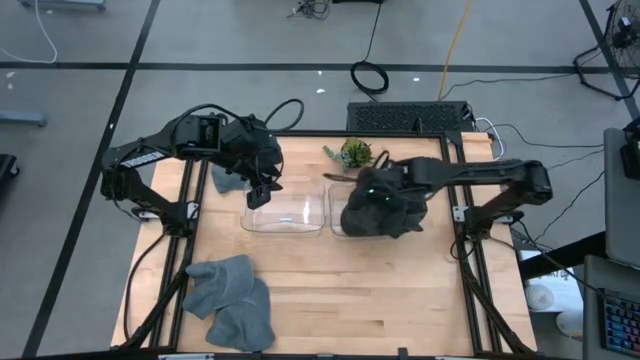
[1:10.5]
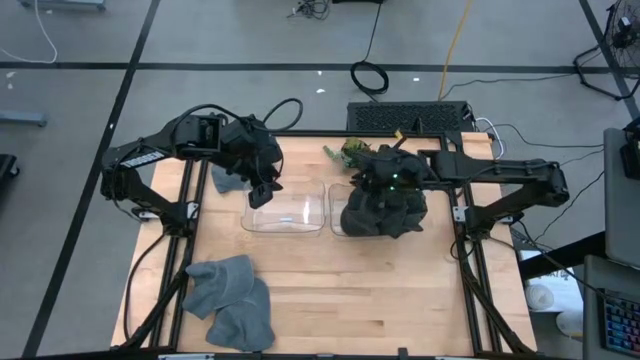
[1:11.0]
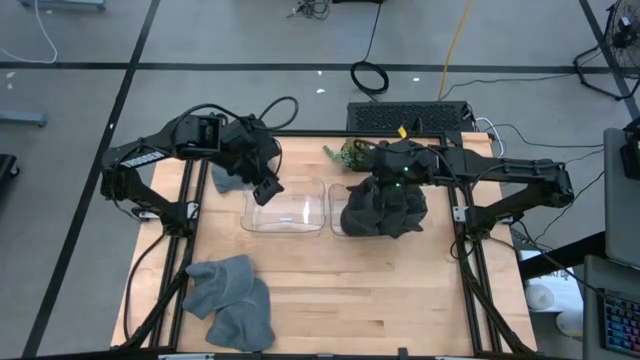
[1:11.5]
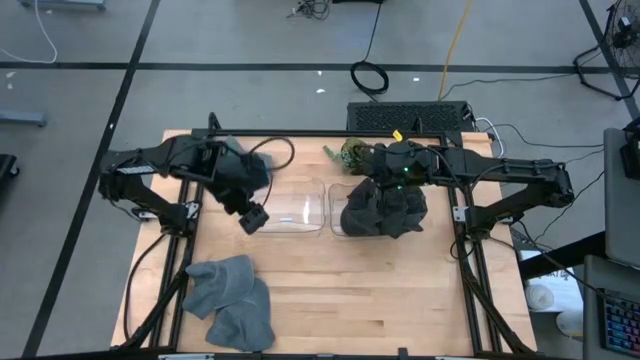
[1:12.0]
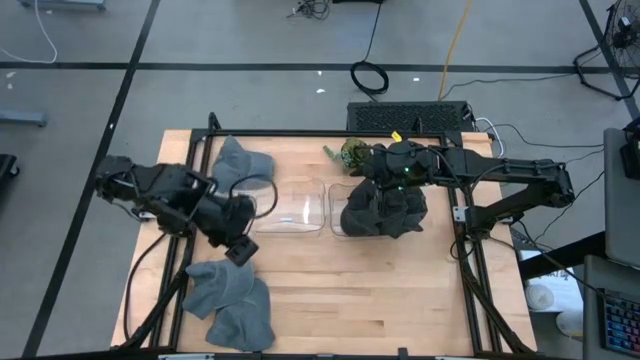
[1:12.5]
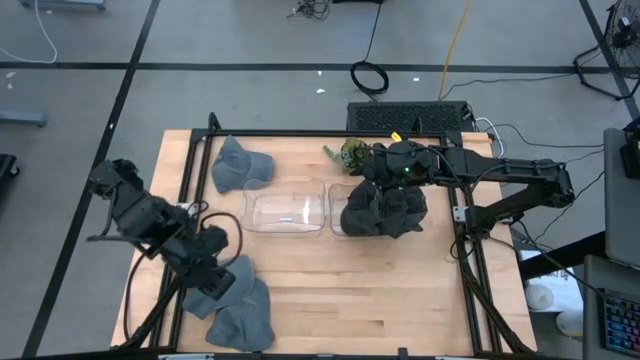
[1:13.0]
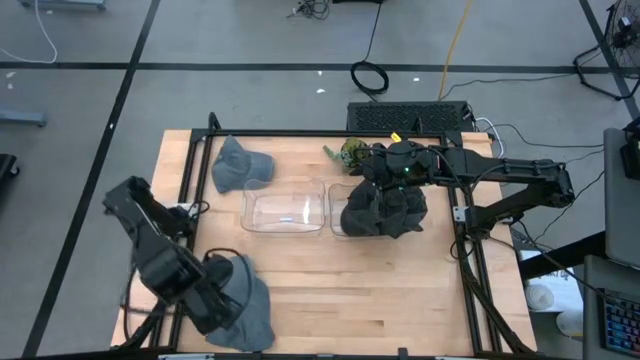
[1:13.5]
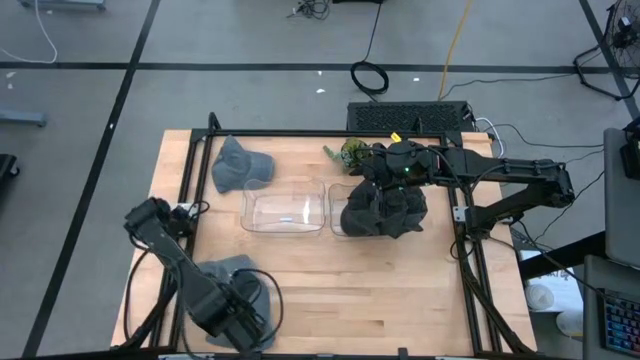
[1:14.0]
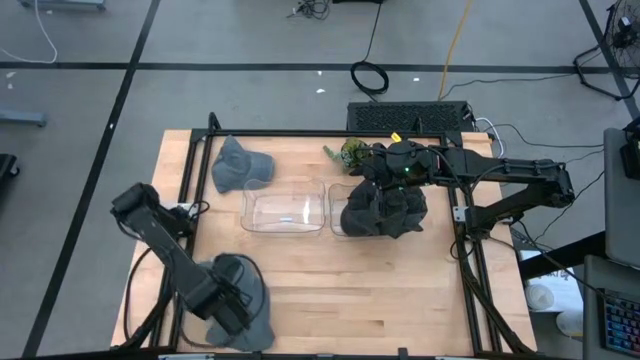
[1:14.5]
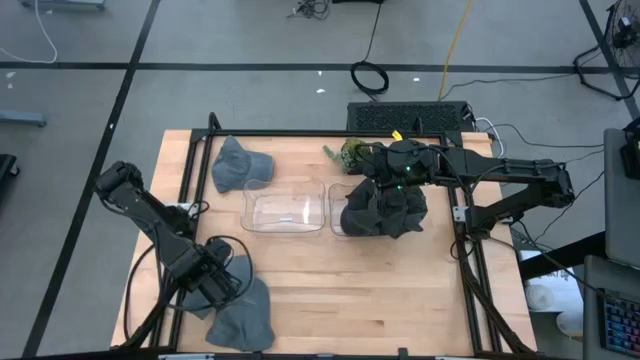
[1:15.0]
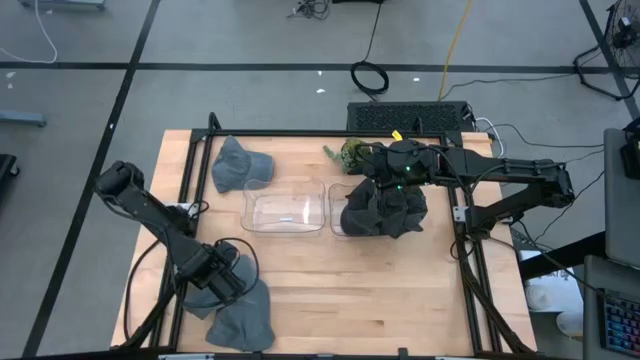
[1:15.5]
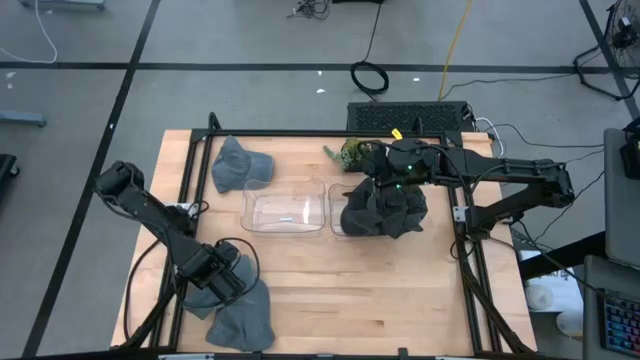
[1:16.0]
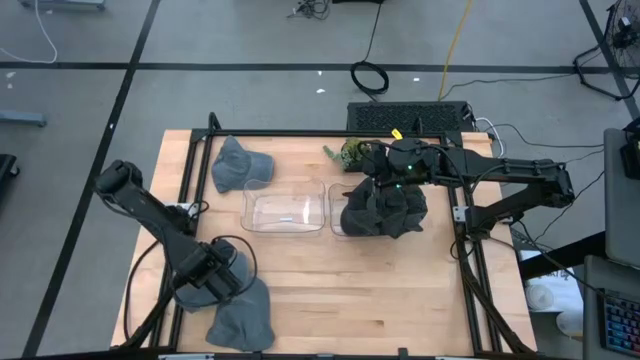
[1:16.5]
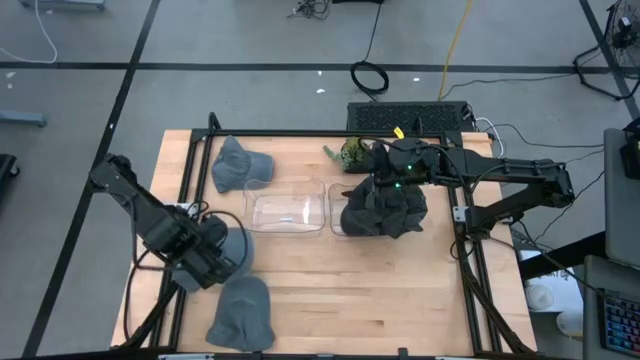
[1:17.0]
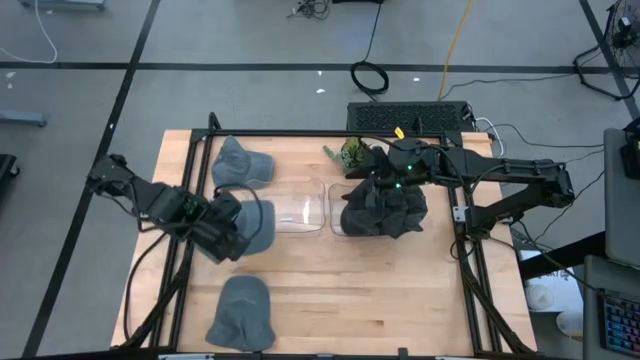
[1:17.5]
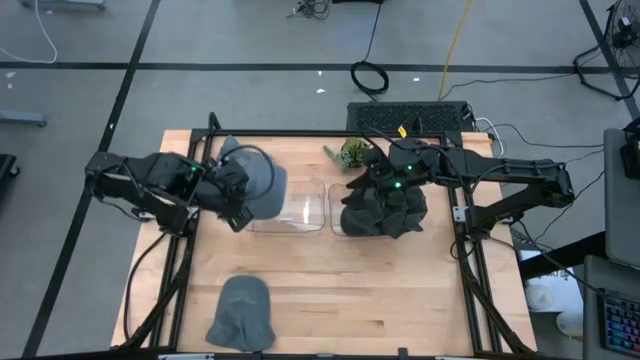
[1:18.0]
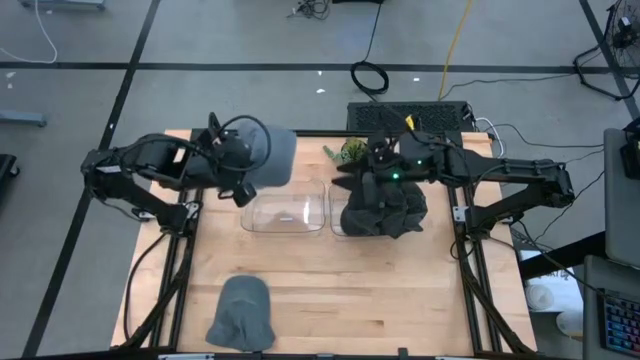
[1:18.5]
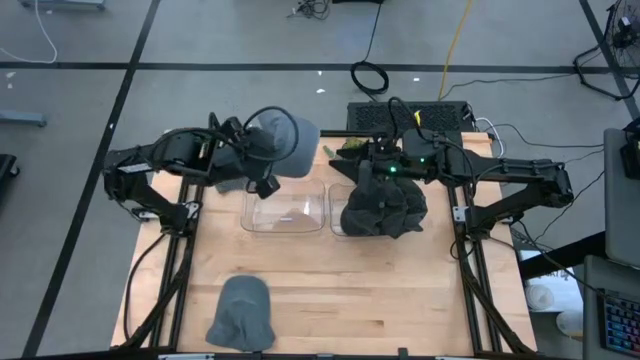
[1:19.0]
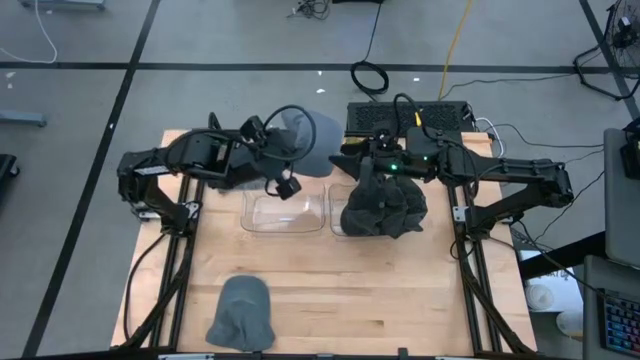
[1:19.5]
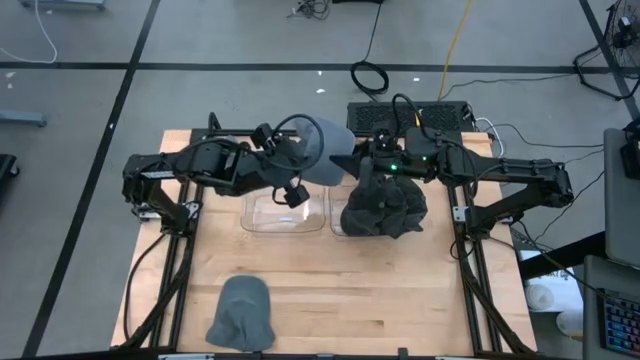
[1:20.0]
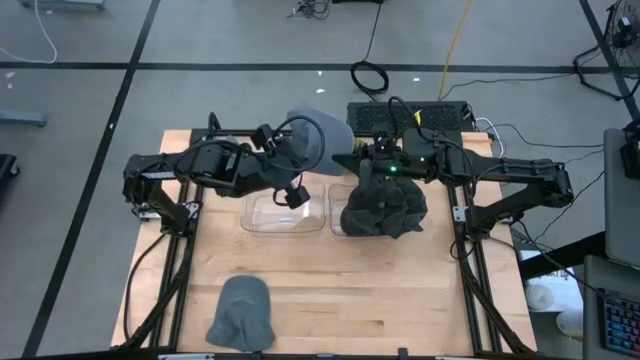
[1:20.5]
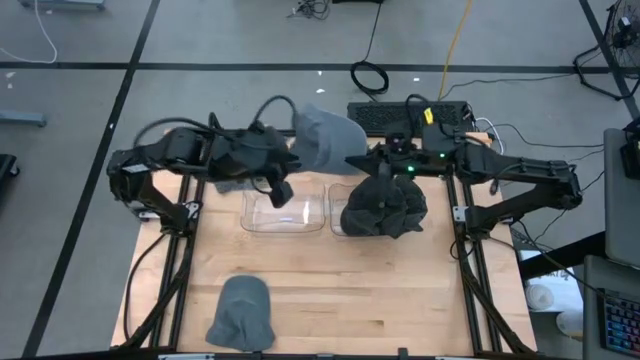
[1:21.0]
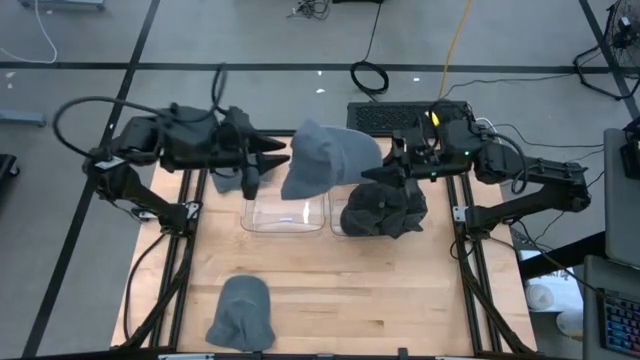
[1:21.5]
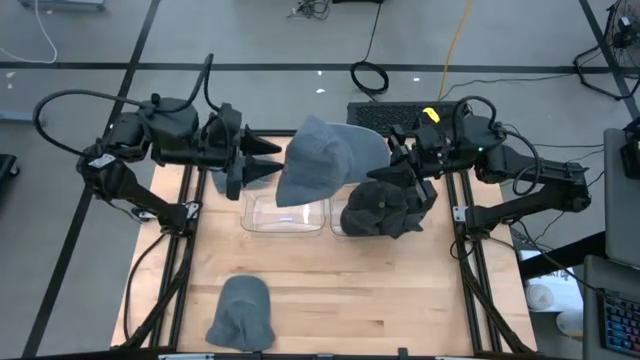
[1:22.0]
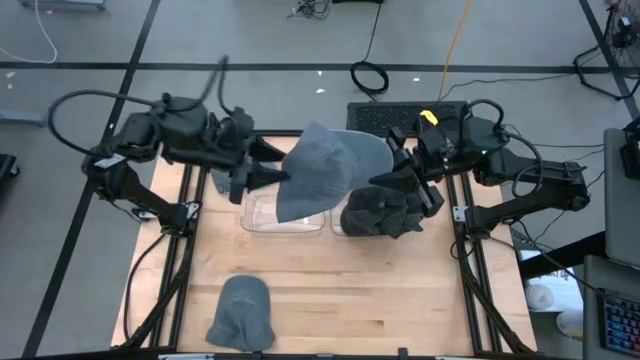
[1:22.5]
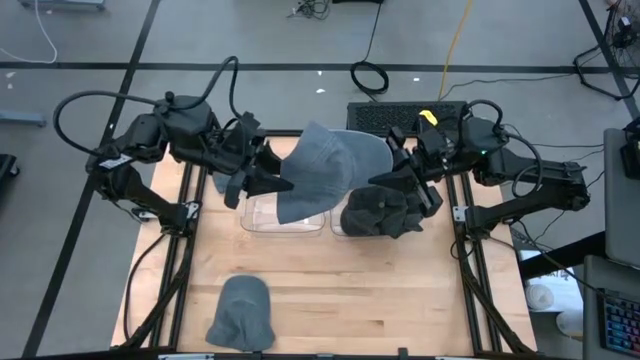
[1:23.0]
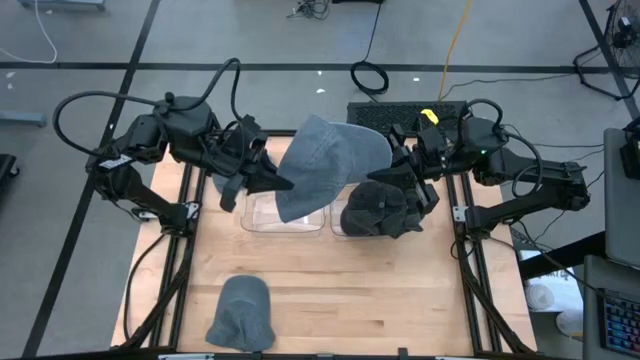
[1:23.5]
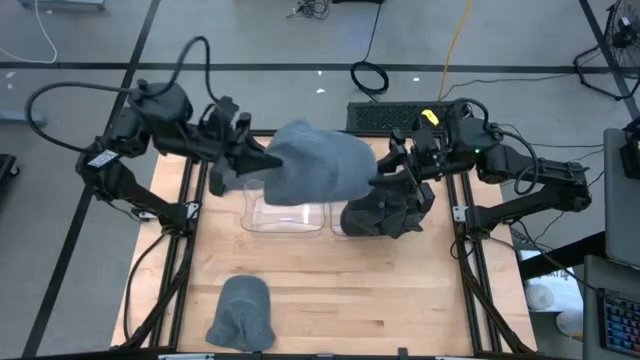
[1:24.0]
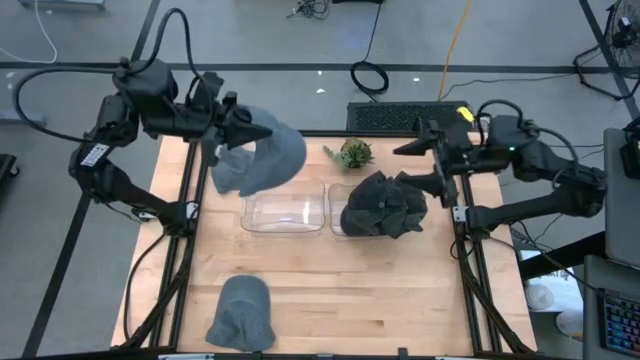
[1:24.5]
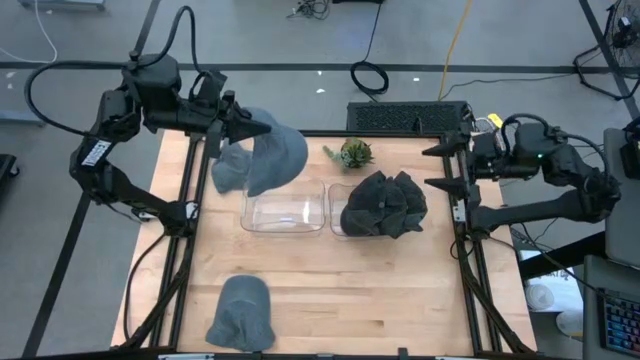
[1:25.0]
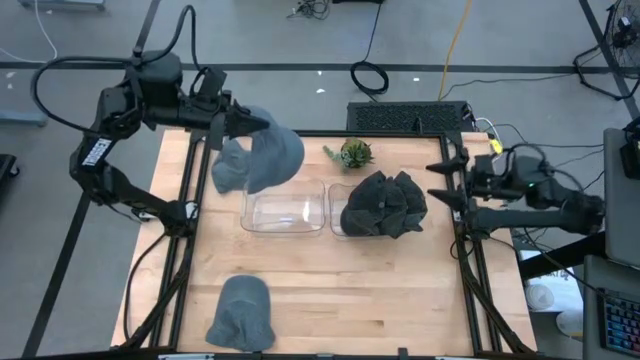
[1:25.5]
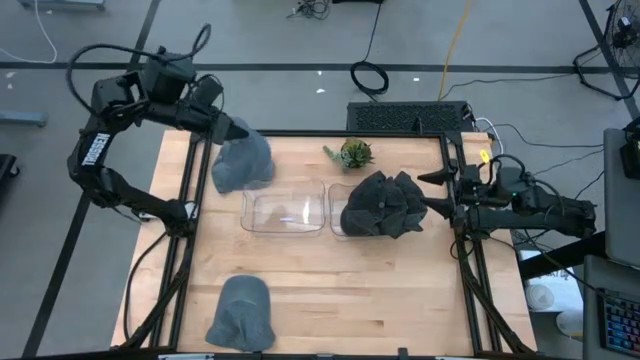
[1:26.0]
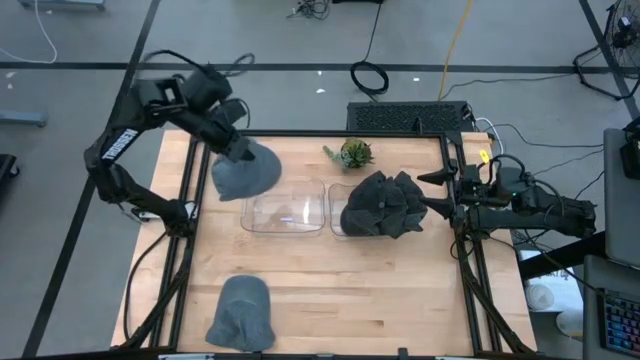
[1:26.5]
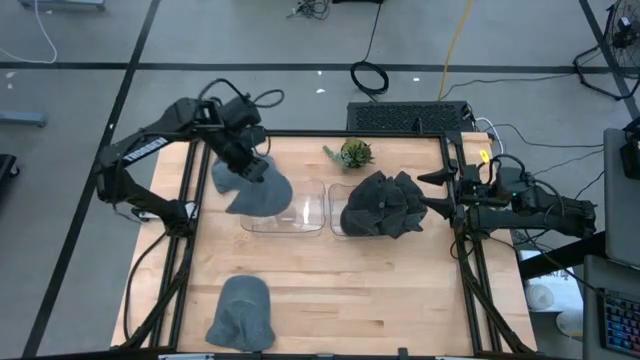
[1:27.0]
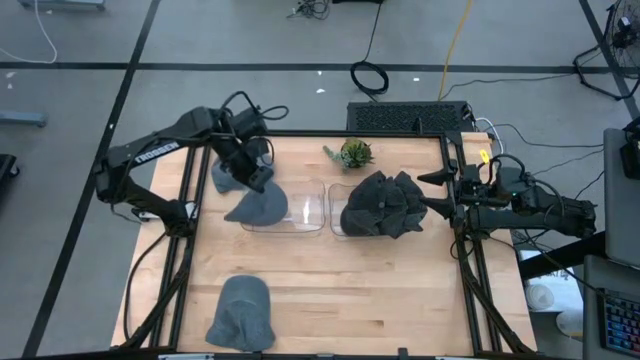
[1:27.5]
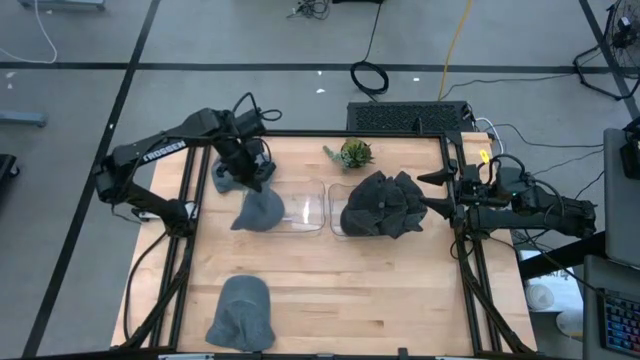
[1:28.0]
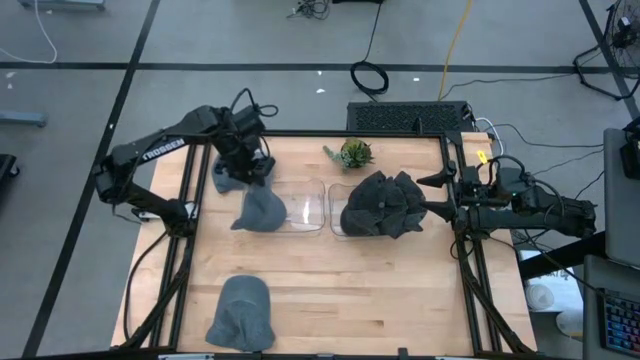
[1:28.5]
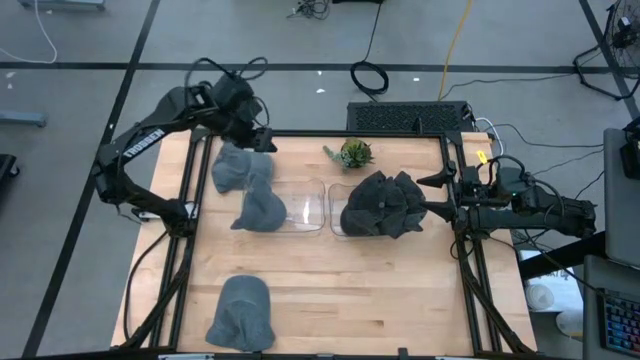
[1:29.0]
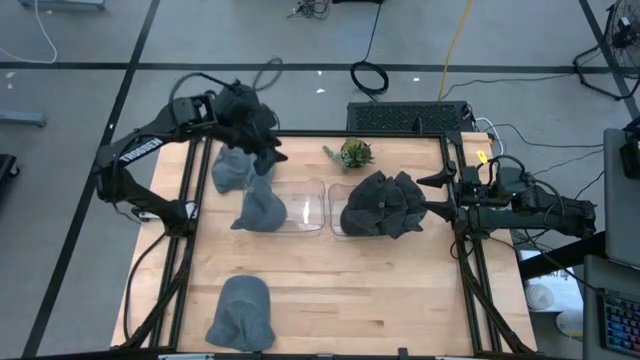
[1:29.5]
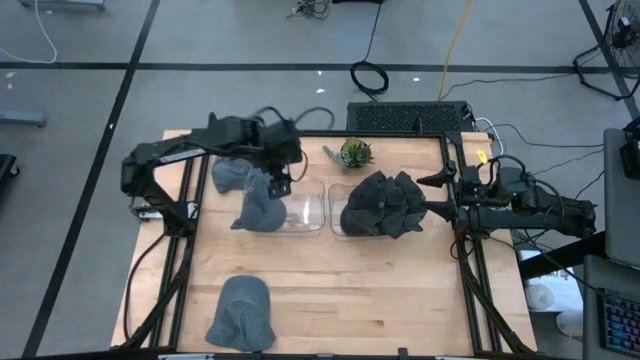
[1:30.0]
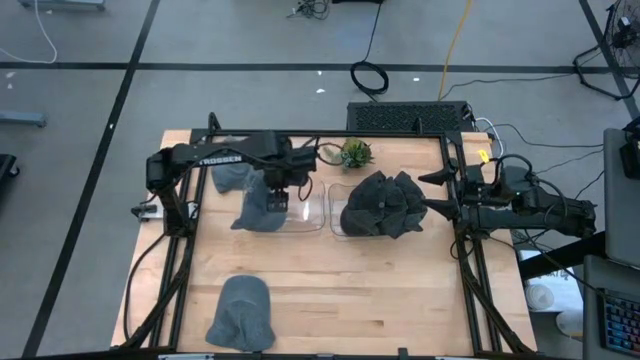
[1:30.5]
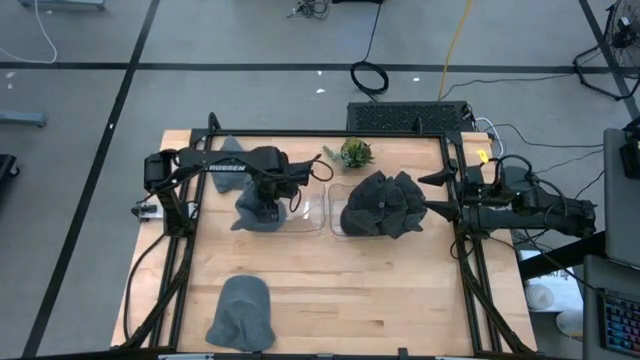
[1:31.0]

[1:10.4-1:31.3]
Task: Pick & Place hat
Put the middle gray cap into the left transparent bin
